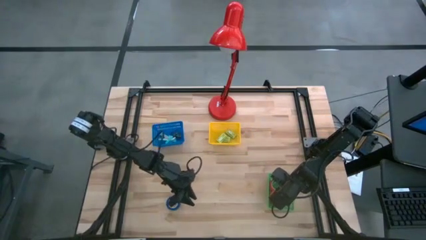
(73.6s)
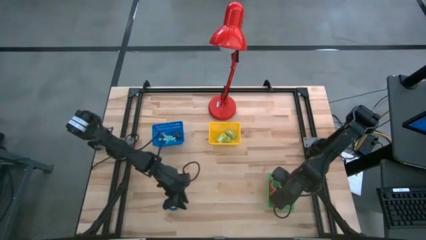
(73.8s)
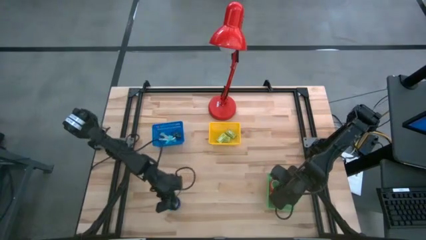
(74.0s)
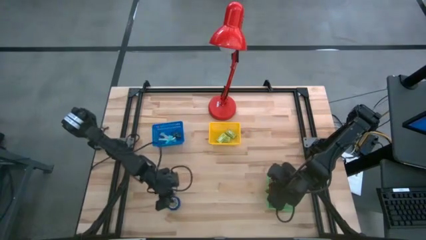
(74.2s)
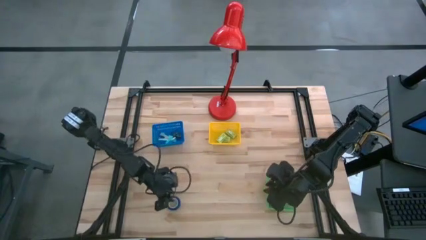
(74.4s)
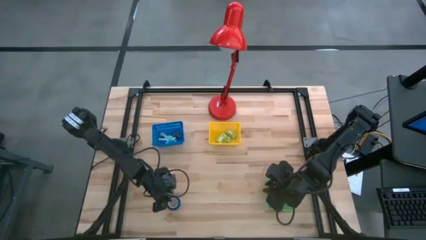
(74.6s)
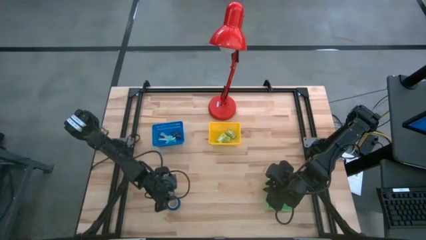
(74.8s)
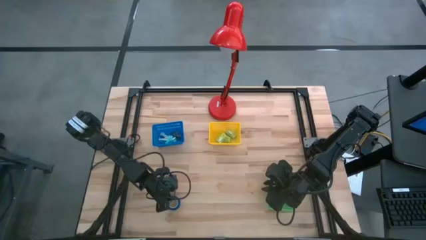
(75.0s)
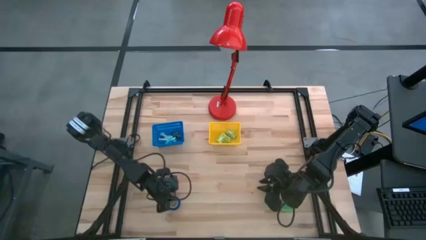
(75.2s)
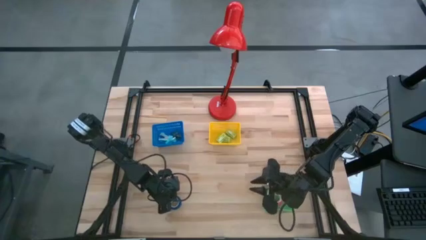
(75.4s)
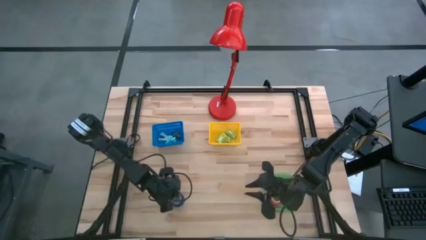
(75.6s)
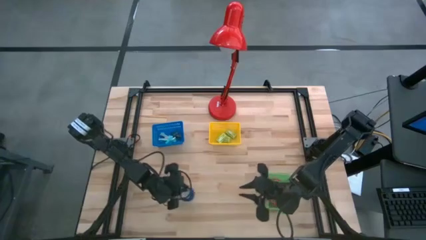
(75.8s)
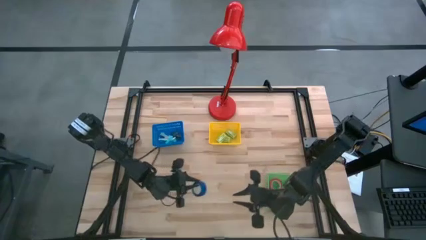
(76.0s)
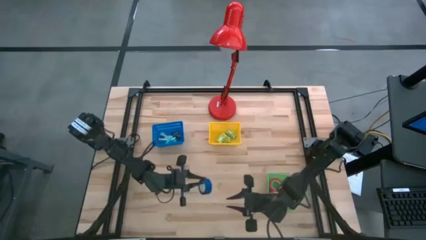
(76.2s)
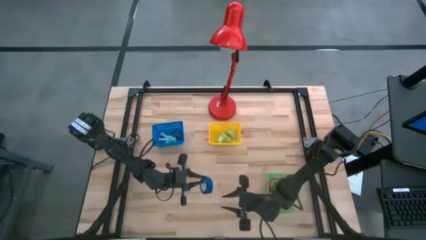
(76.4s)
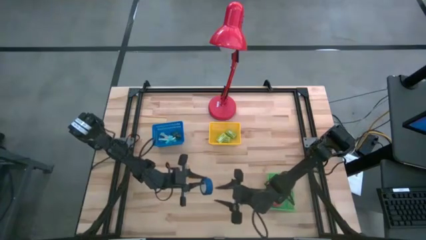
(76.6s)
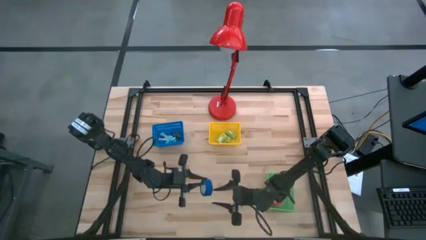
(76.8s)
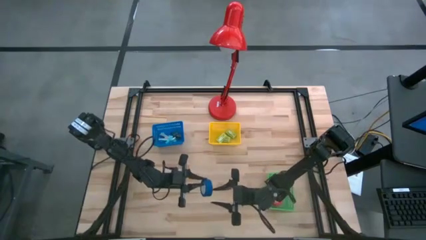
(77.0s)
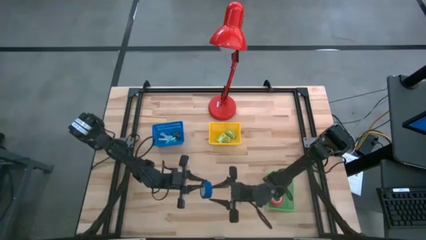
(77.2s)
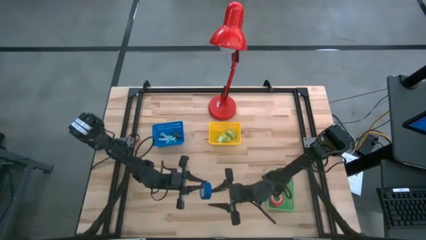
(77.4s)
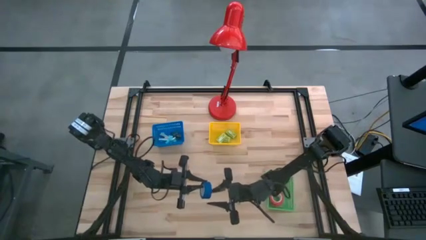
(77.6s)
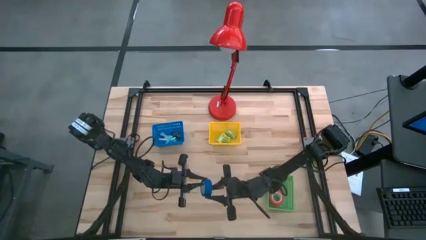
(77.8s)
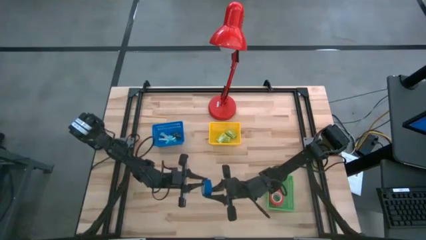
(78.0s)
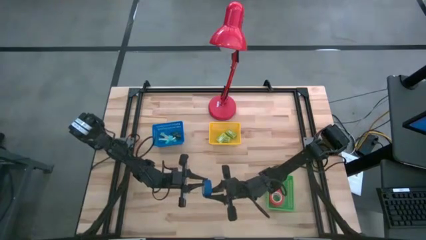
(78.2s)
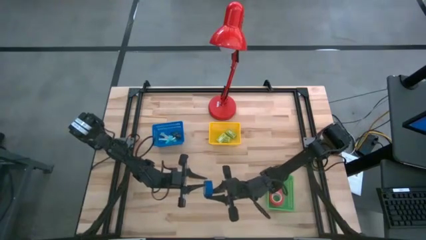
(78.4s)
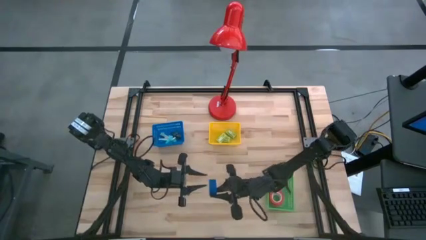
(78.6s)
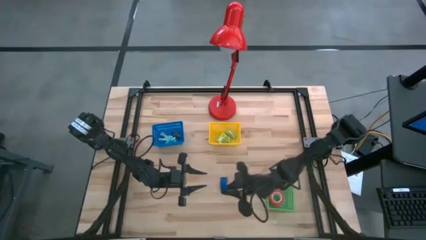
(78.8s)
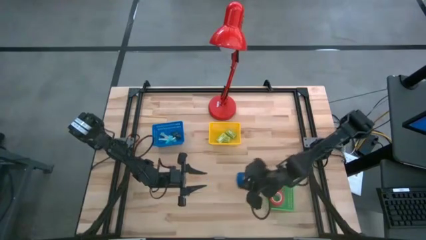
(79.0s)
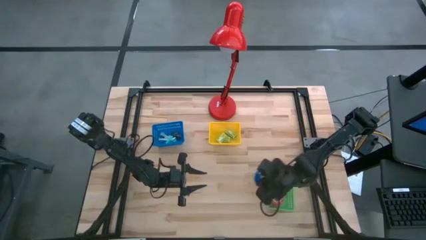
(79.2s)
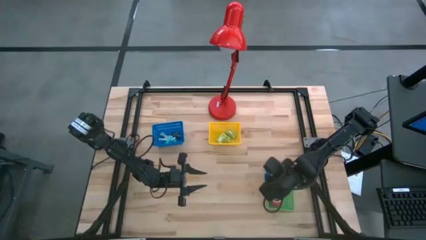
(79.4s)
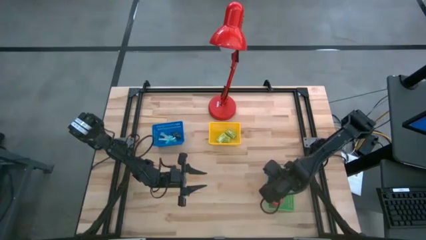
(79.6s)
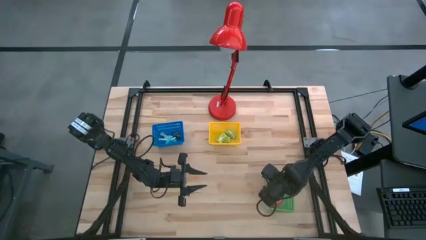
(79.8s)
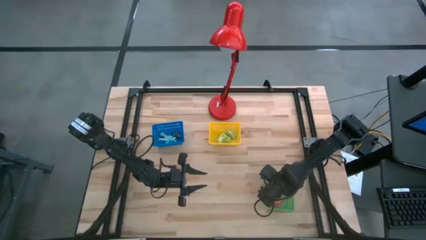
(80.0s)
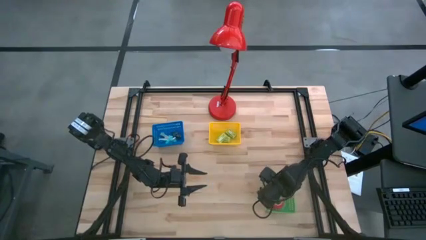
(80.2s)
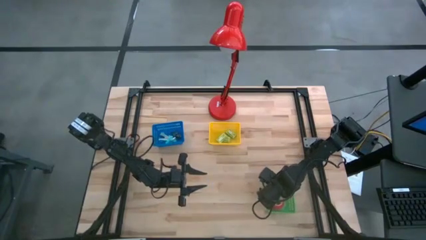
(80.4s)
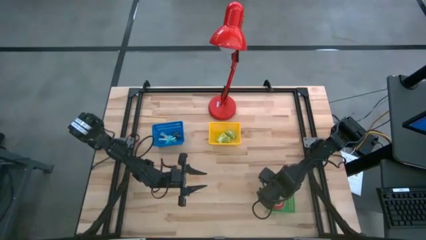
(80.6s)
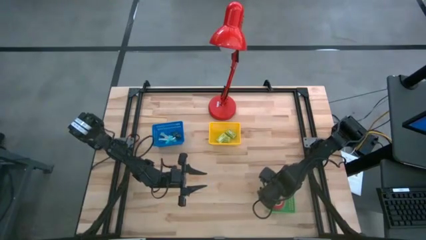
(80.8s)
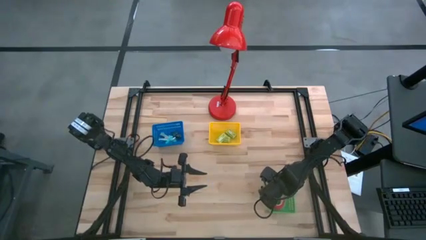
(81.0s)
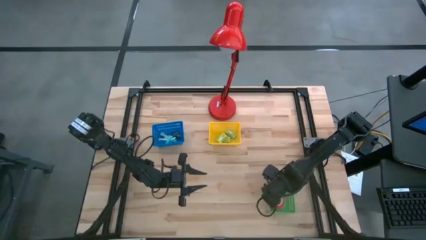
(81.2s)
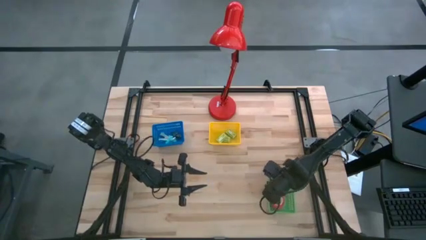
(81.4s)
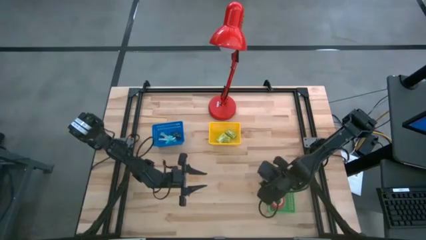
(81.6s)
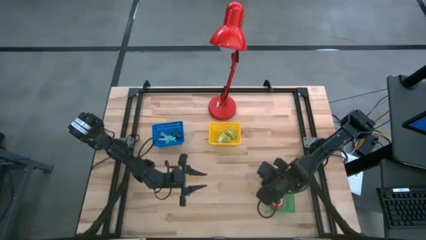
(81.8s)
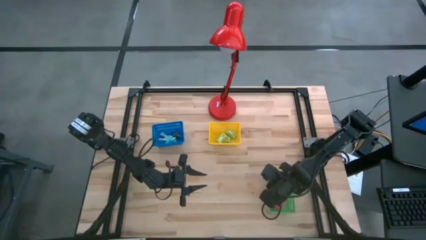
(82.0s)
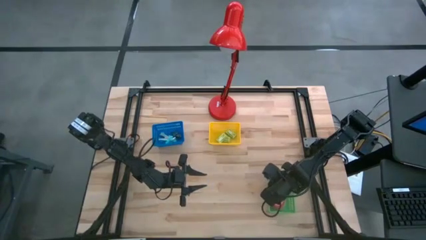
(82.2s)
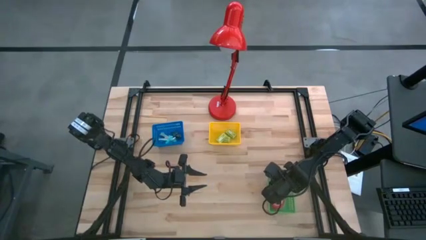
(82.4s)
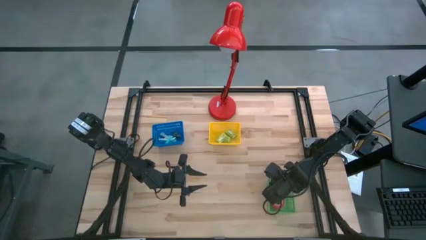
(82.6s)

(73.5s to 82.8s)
Task: Pick and place Stapler, Stapler remover, tape
Put the blue tape into the green bin

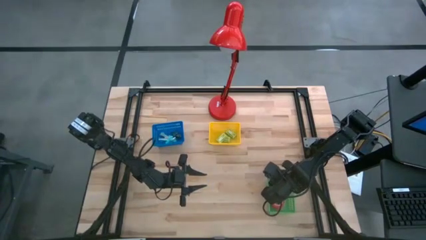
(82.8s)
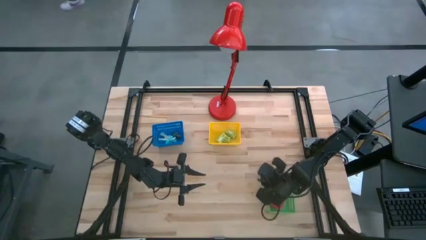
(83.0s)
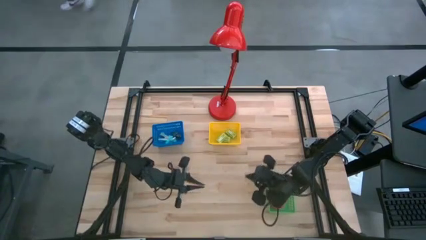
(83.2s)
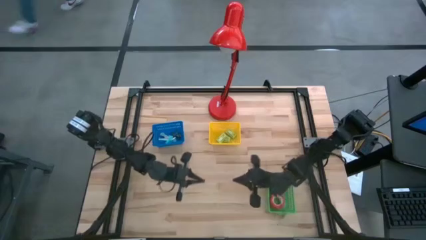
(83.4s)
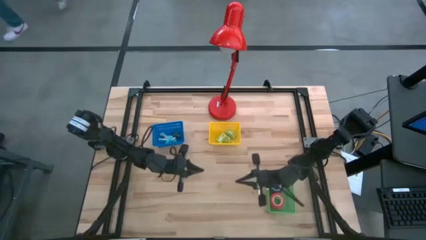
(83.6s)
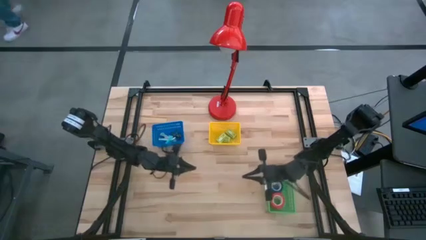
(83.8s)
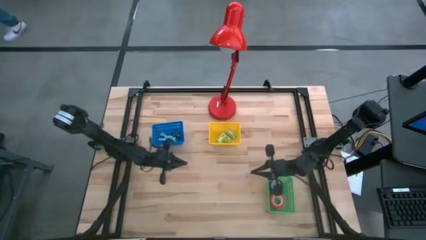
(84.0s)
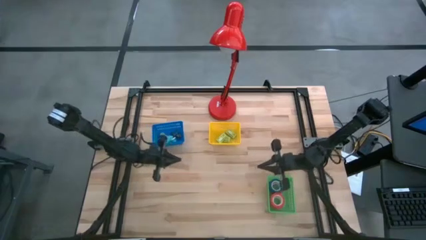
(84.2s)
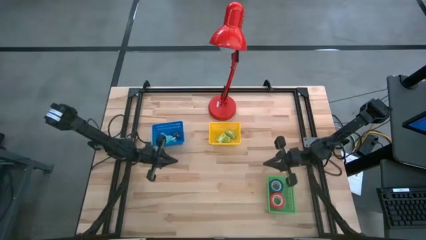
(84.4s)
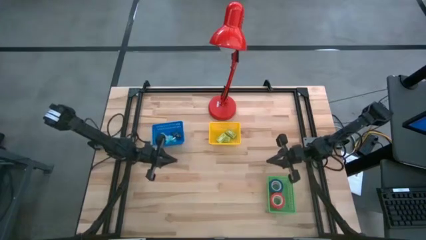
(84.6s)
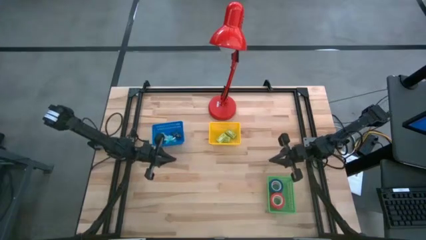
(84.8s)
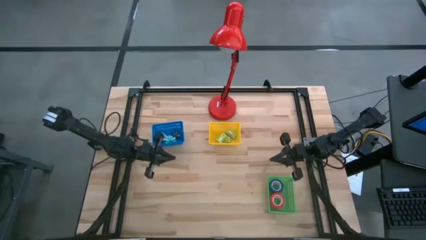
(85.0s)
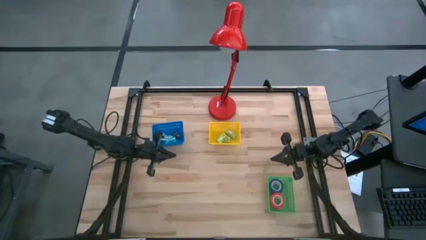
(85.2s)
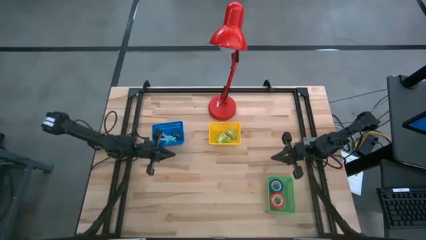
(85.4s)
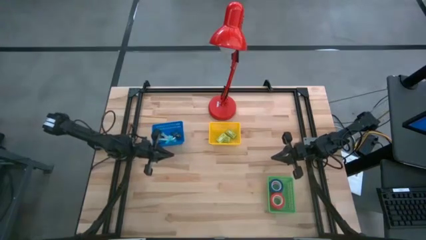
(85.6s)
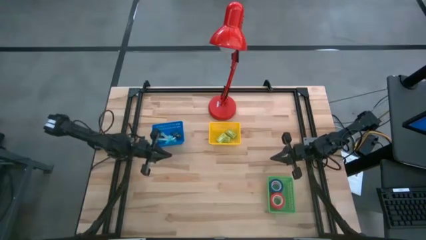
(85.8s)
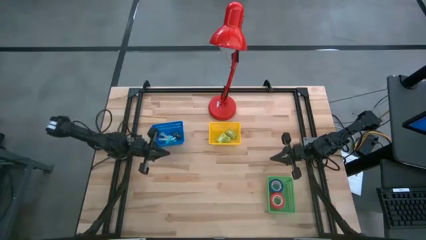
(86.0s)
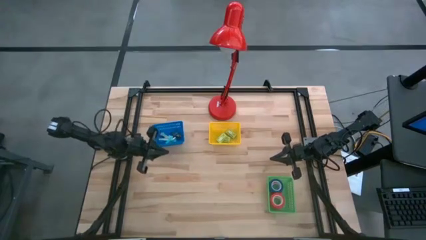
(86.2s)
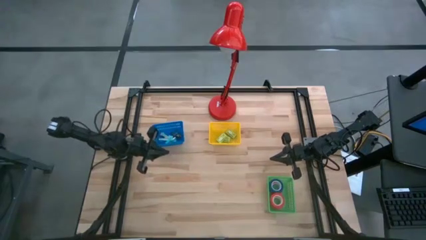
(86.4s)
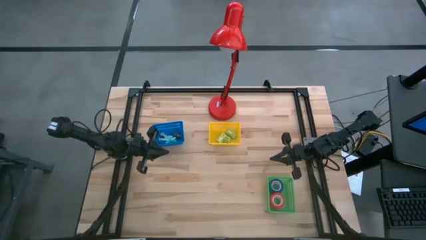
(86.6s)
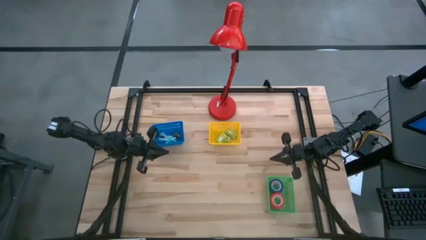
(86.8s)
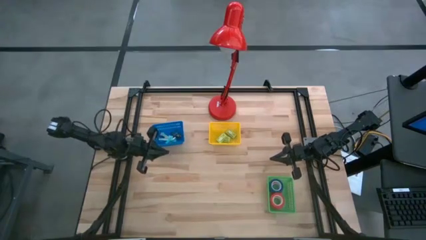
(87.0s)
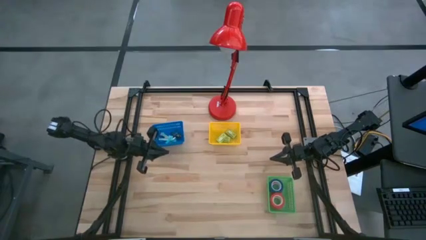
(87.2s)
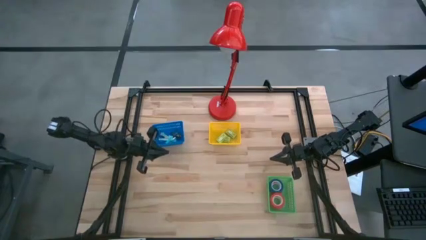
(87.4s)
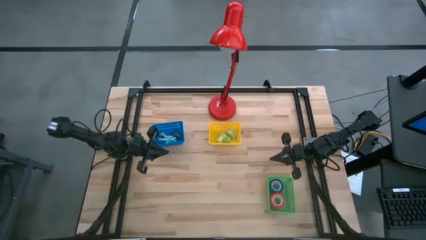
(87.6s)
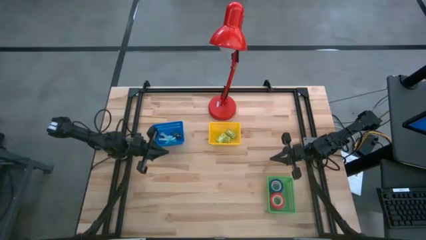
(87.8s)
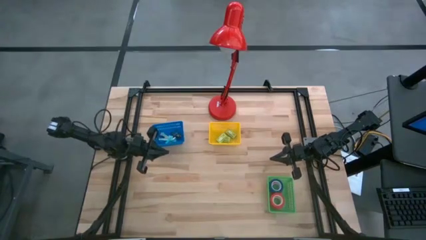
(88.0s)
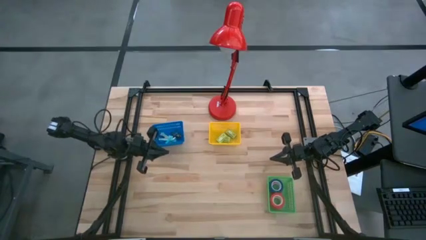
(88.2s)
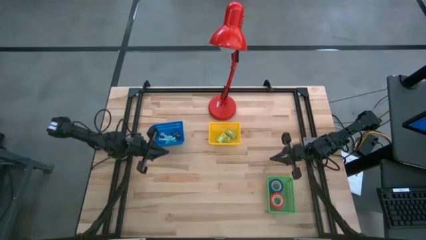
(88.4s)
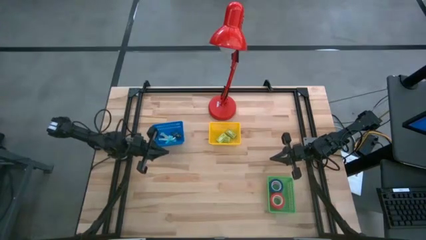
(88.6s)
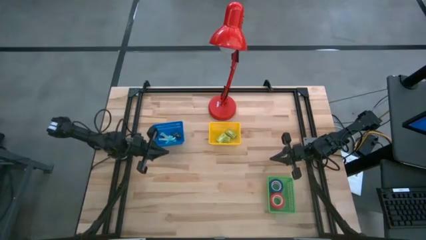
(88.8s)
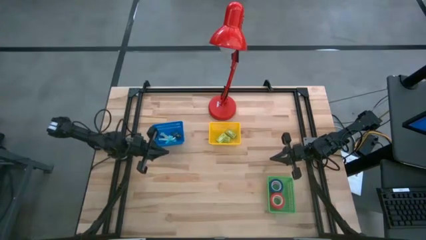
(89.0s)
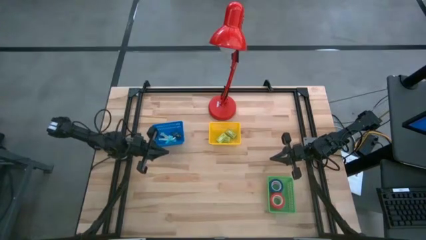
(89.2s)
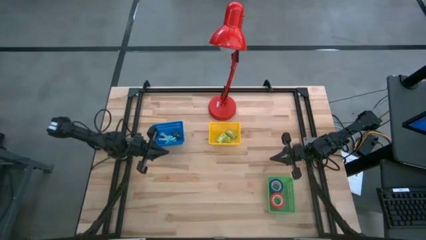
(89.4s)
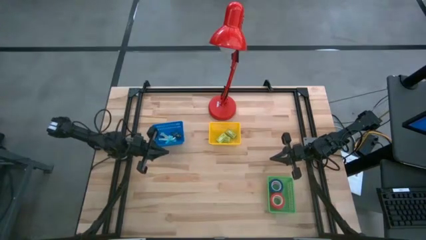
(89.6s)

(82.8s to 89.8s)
Return to Home Position
